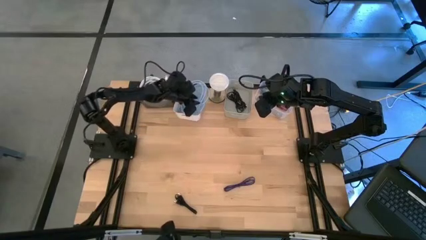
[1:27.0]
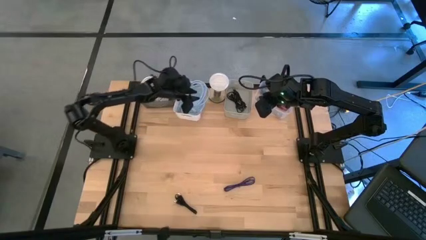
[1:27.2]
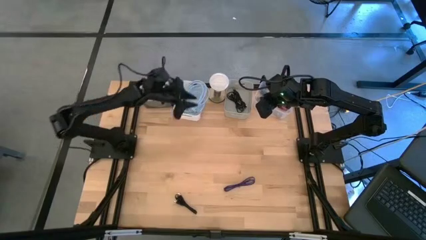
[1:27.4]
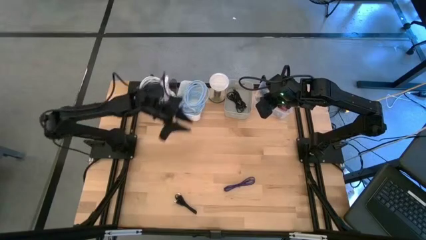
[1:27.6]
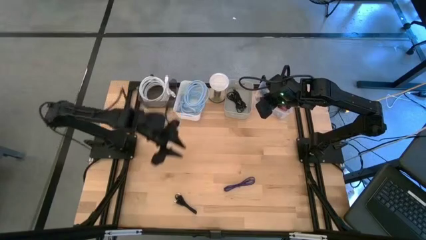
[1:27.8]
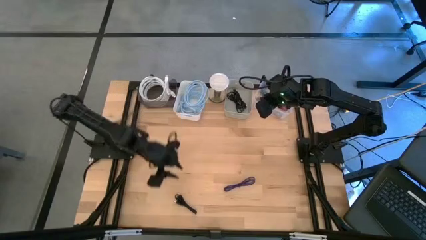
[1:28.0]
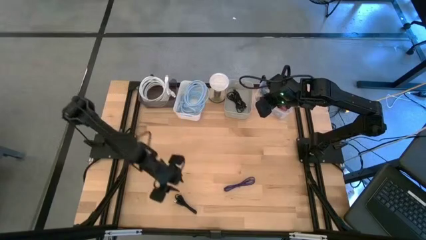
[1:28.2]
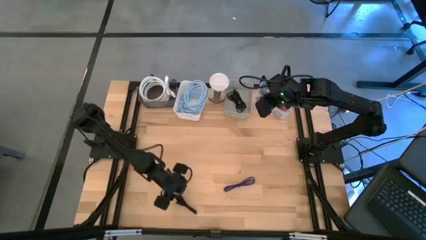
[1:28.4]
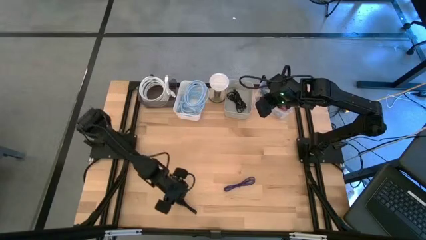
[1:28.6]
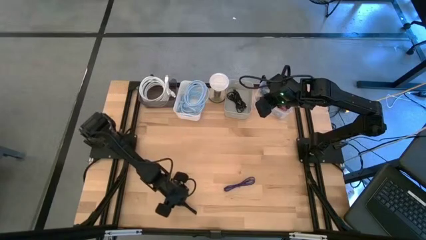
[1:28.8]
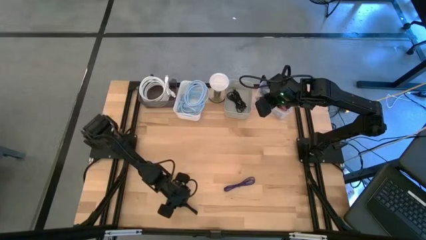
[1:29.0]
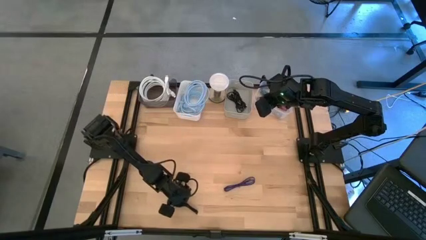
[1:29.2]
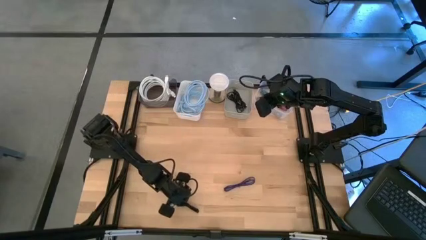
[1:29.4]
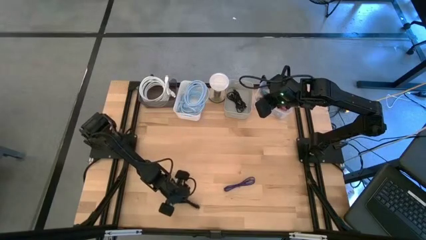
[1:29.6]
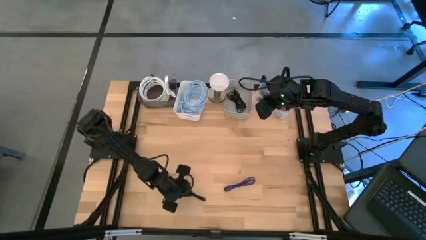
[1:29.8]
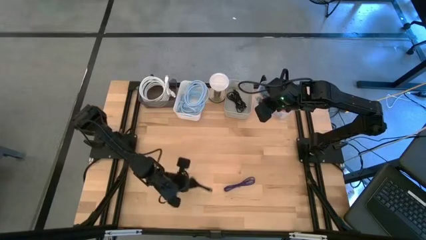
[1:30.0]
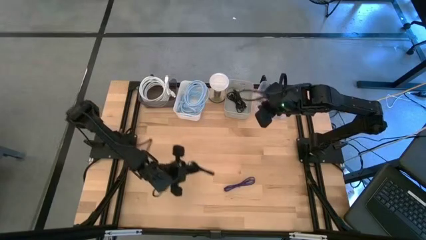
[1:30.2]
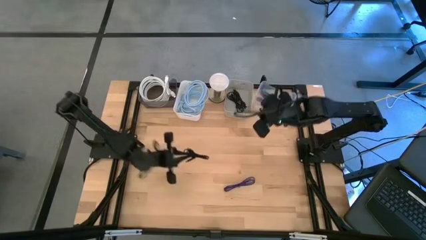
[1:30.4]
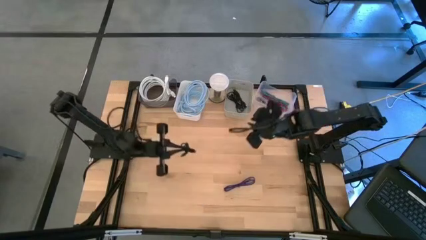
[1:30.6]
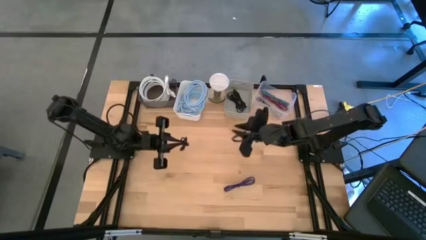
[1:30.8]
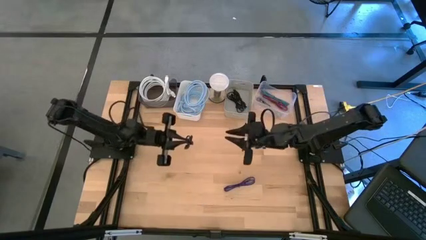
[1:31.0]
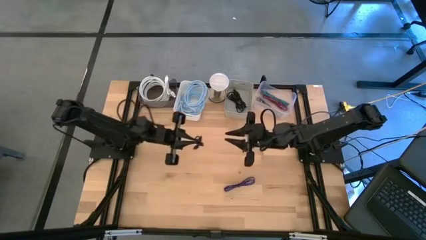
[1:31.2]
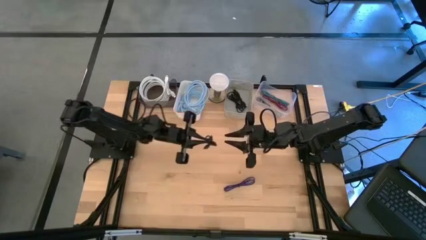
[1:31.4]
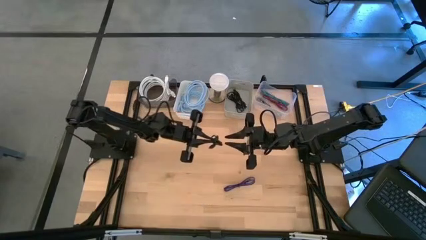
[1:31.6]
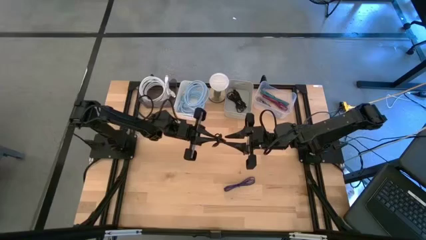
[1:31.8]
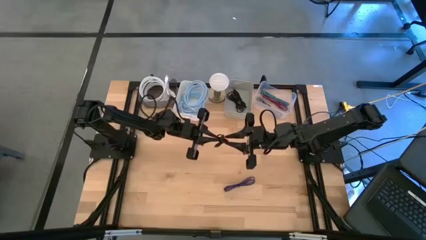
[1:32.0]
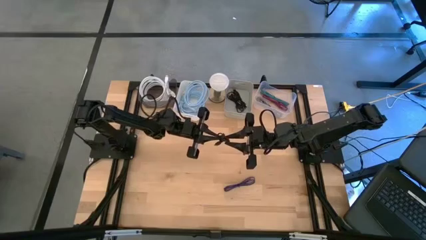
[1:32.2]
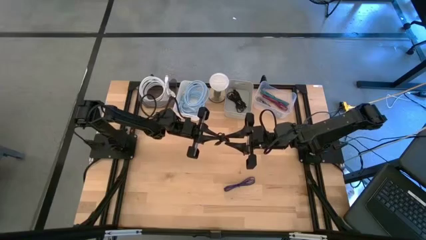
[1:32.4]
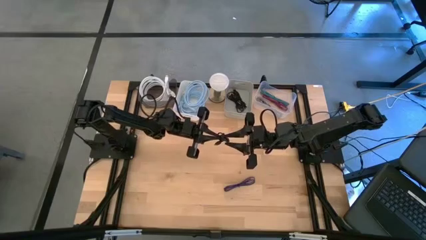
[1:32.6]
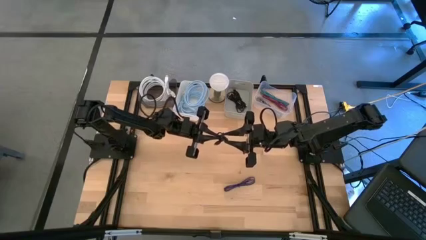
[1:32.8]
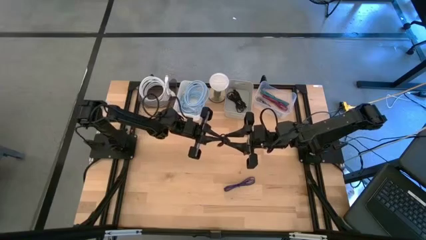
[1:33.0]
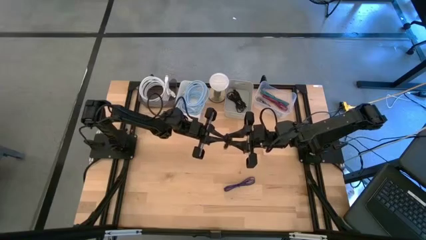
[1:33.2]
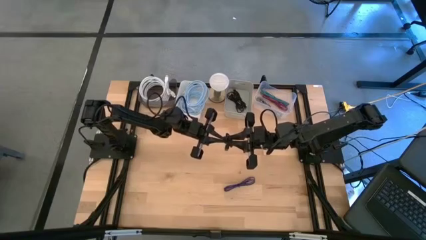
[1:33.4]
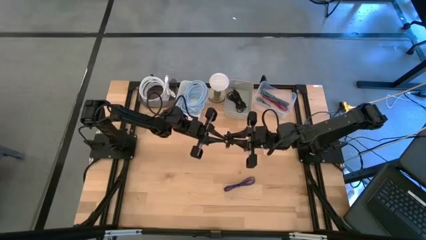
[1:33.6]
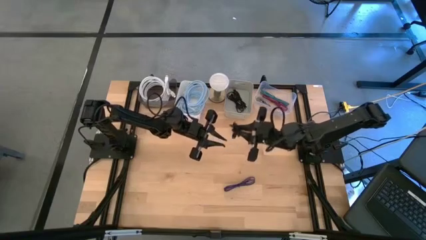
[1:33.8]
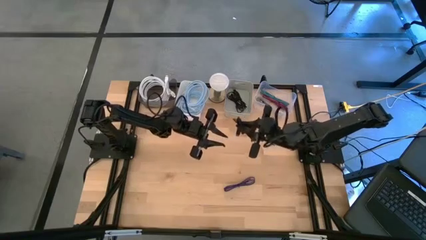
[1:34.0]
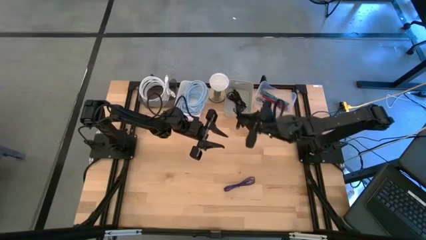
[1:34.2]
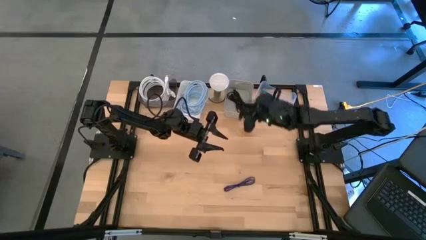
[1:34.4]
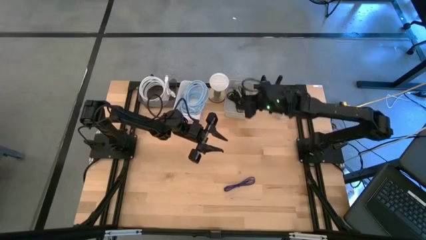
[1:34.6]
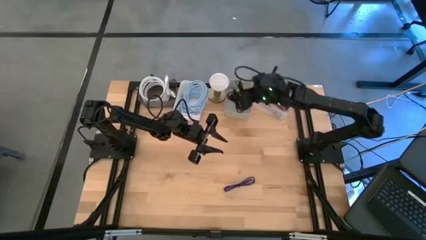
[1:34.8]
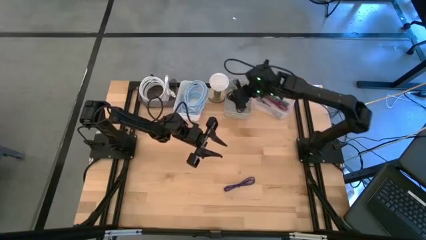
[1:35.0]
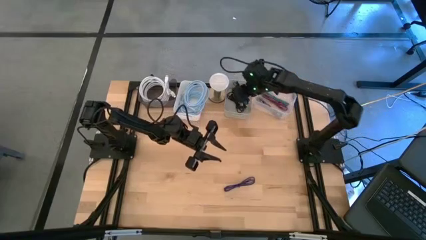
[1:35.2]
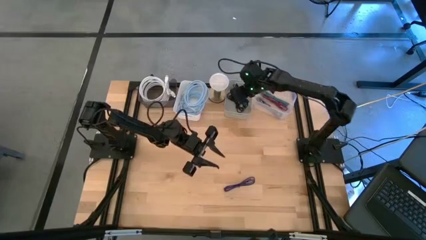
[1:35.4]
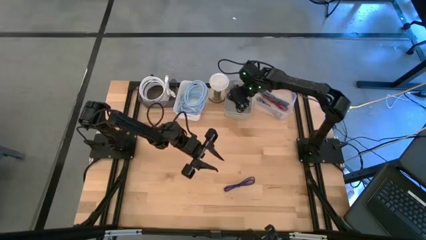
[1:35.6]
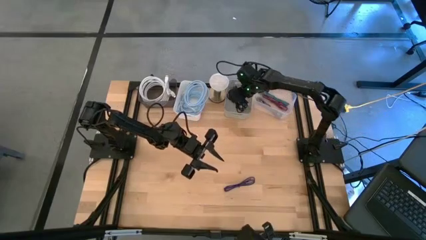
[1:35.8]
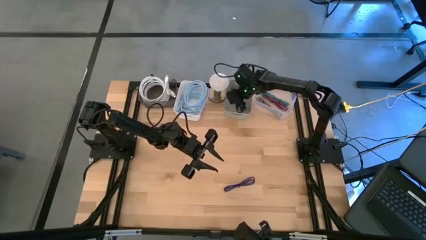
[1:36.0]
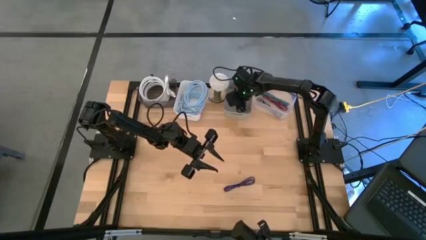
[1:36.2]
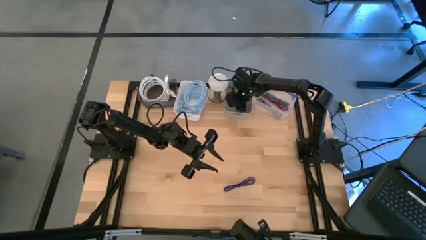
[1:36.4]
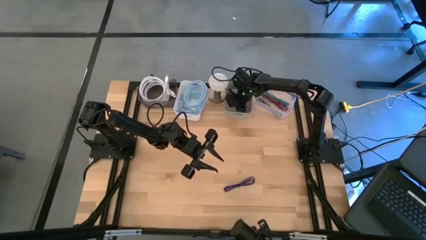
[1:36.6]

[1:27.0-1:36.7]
Task: Pick & Place USB Port
Put the black charger cable into the gray bin

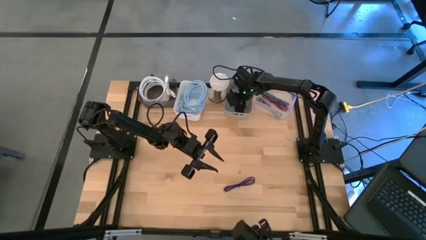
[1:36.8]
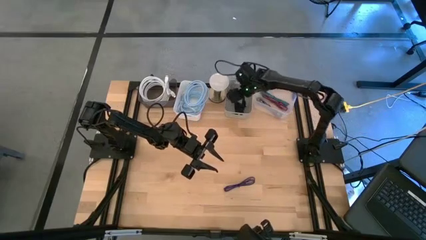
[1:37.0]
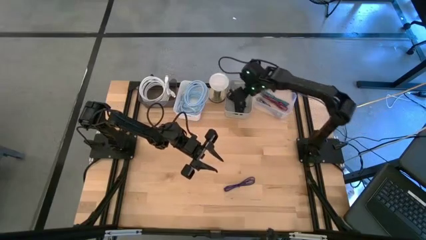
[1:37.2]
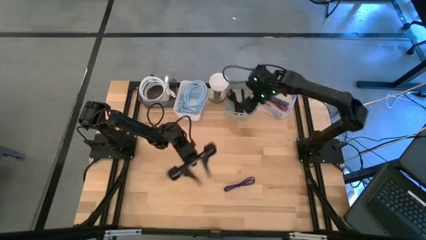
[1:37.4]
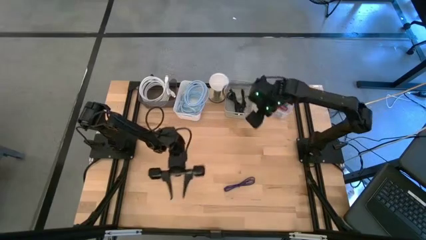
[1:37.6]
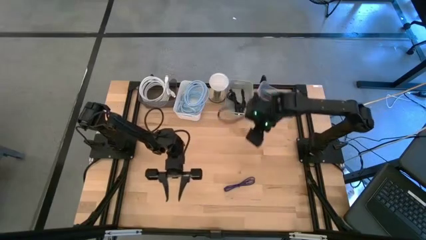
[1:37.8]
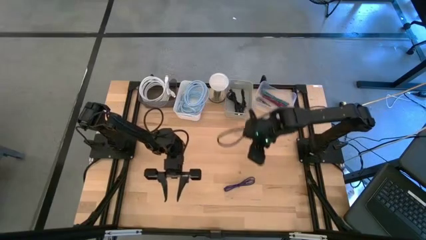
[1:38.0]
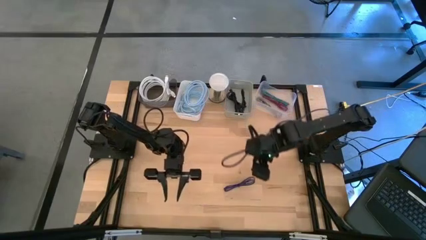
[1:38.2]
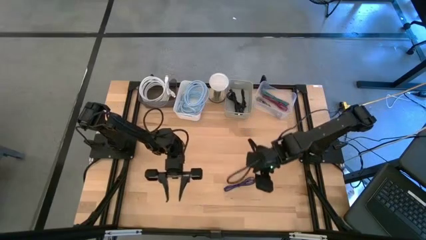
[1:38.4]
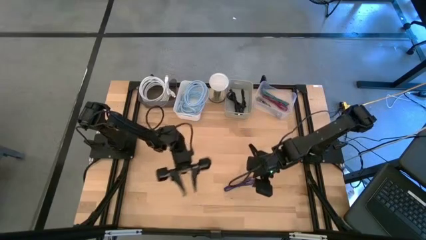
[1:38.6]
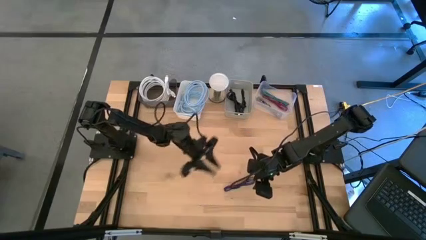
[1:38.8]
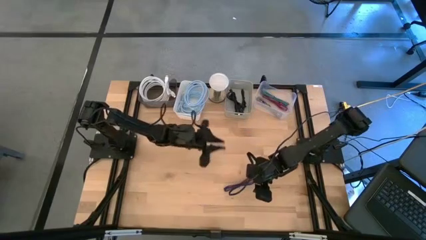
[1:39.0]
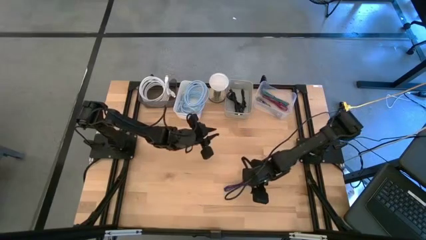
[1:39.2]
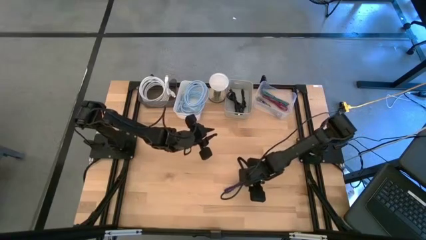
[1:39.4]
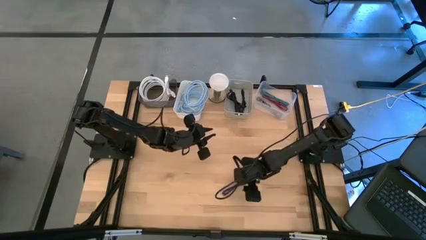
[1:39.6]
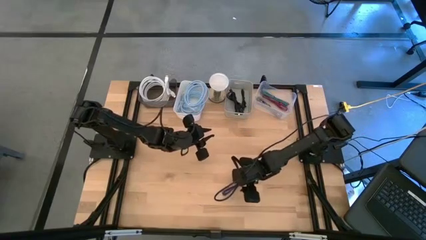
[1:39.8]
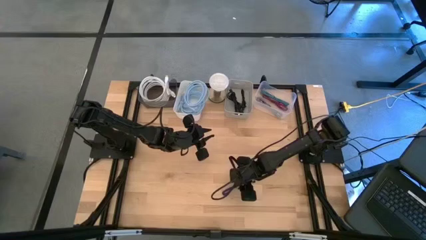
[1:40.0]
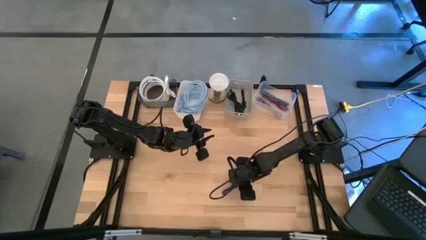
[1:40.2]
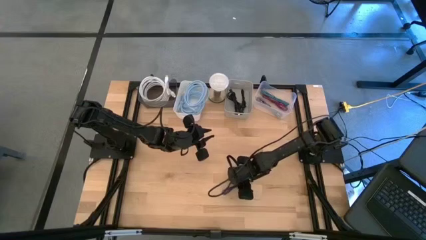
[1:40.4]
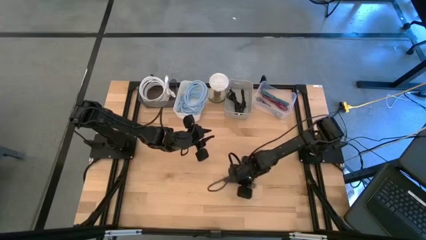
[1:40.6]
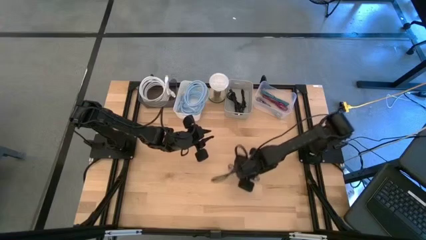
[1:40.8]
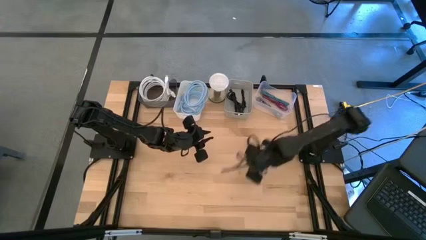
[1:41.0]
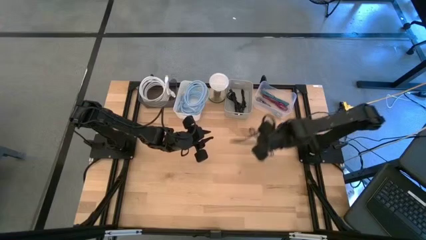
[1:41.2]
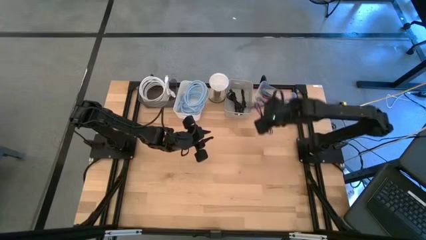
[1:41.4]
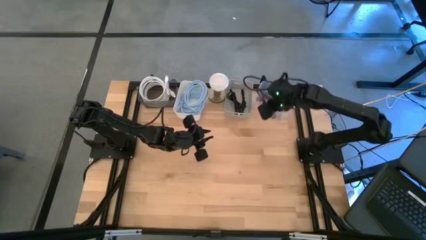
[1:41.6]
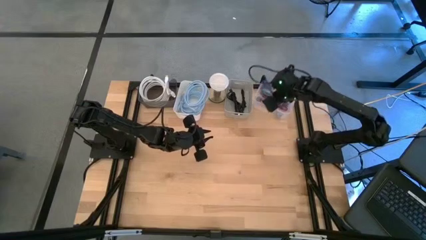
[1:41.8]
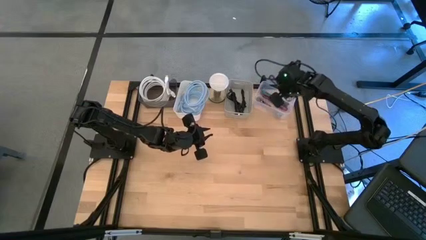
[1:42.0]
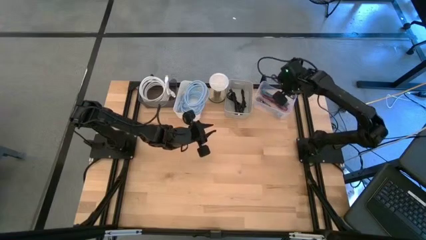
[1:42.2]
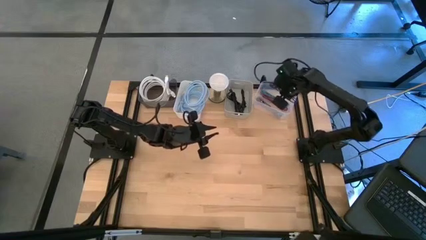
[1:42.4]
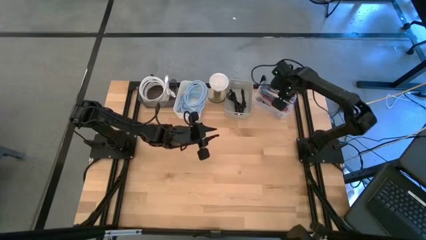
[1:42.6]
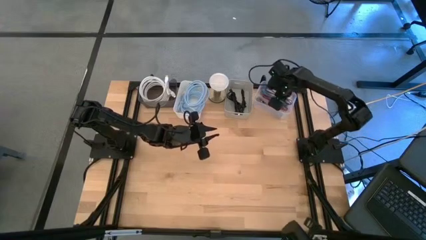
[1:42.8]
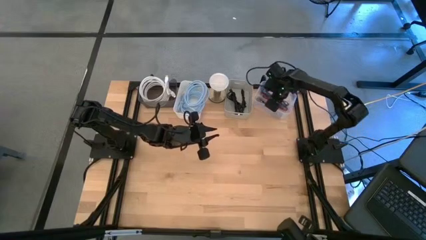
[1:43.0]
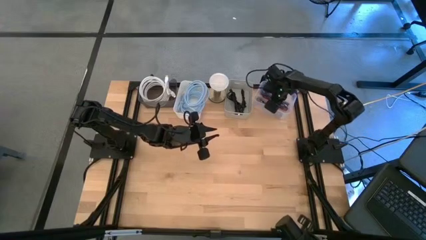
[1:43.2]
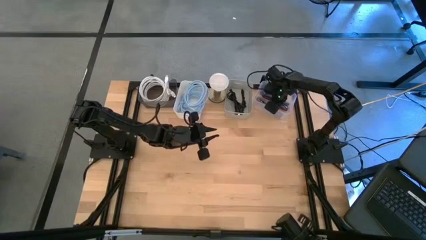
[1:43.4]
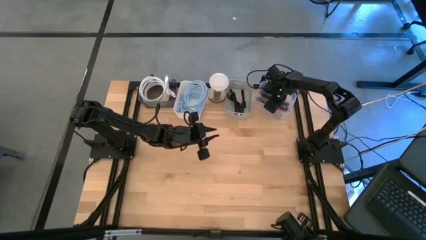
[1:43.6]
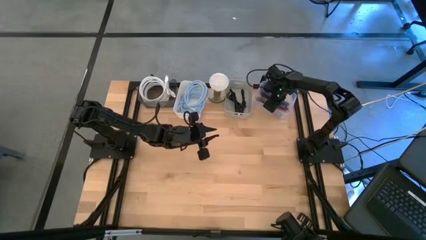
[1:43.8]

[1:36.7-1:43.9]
Put the violet charger cable into the transparent bin
